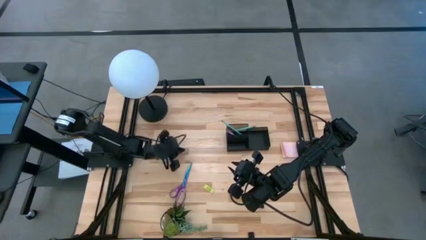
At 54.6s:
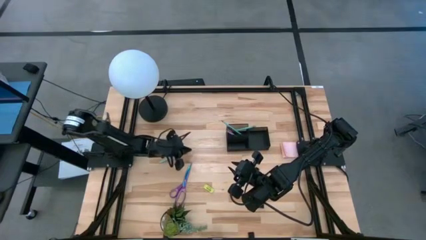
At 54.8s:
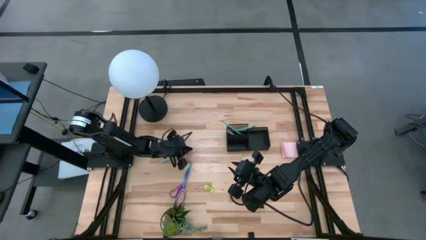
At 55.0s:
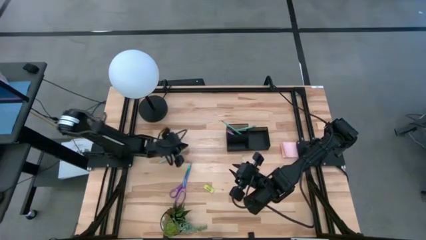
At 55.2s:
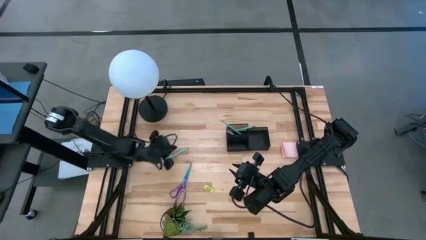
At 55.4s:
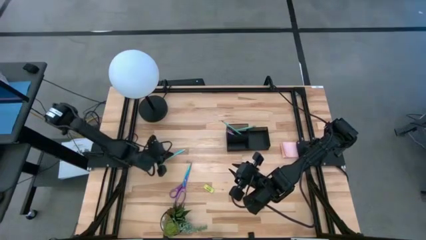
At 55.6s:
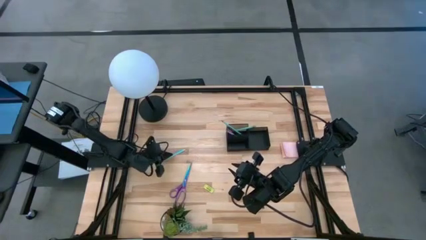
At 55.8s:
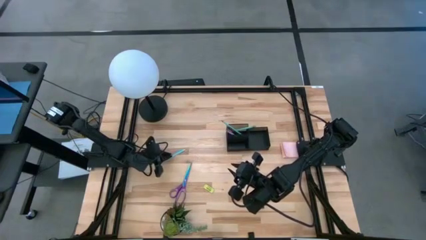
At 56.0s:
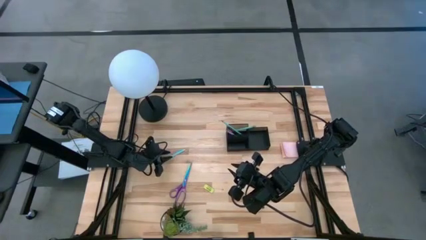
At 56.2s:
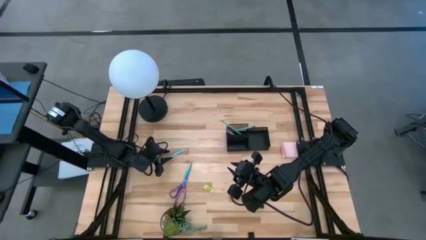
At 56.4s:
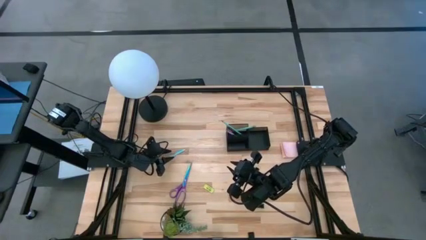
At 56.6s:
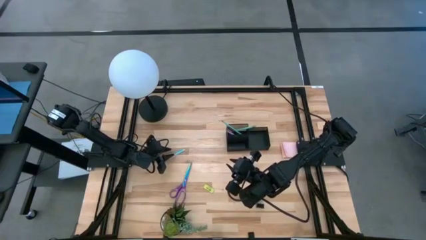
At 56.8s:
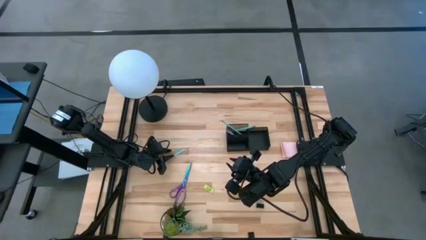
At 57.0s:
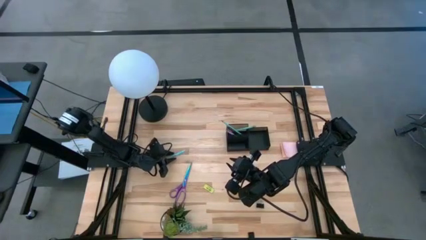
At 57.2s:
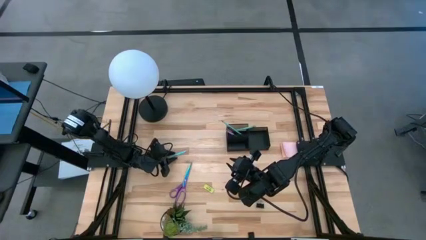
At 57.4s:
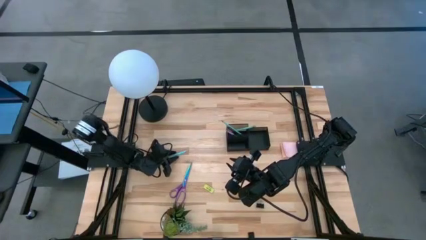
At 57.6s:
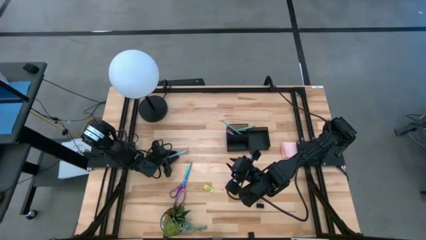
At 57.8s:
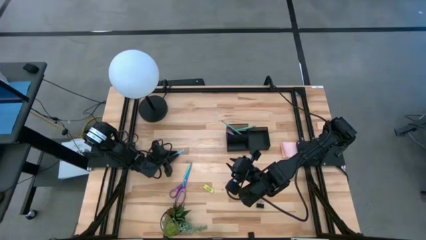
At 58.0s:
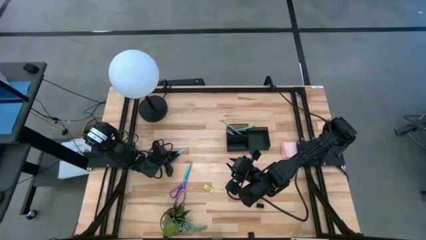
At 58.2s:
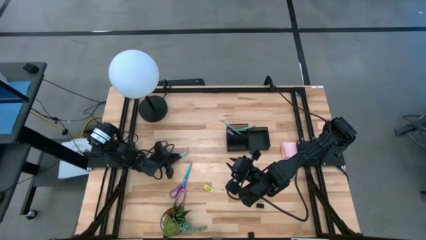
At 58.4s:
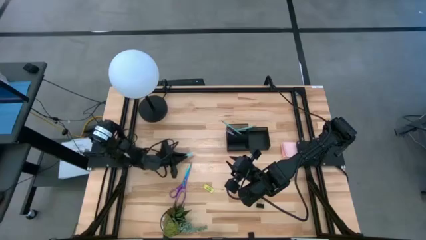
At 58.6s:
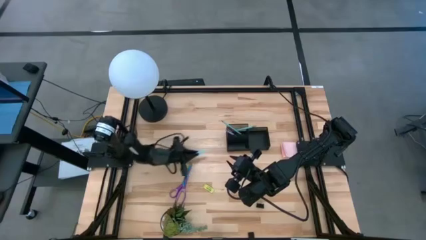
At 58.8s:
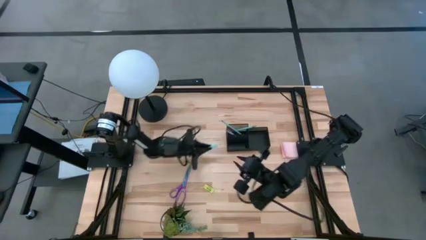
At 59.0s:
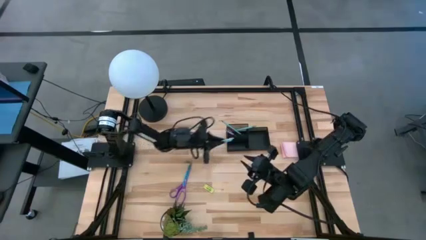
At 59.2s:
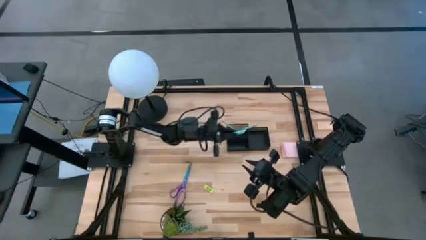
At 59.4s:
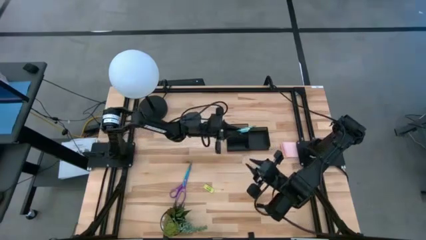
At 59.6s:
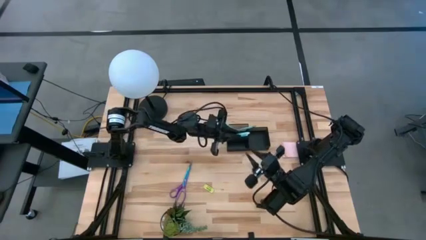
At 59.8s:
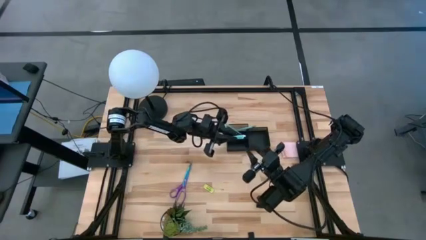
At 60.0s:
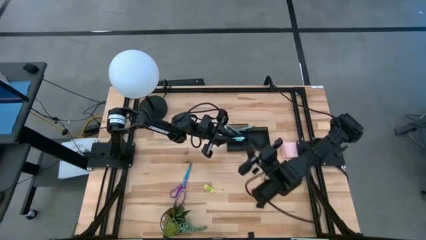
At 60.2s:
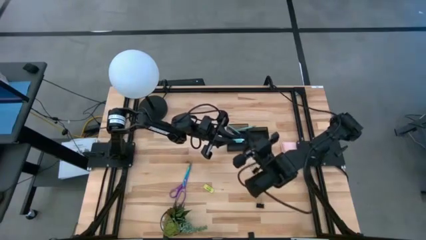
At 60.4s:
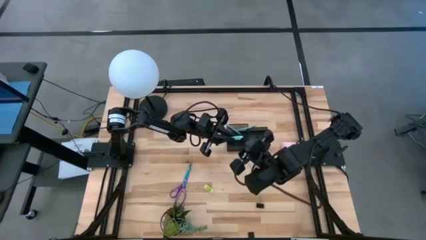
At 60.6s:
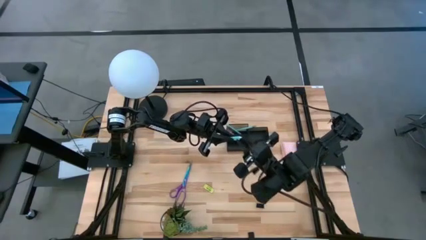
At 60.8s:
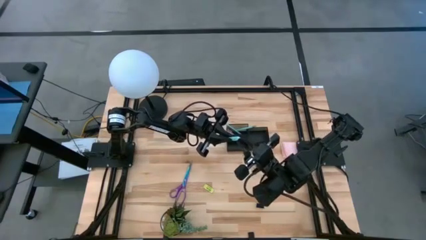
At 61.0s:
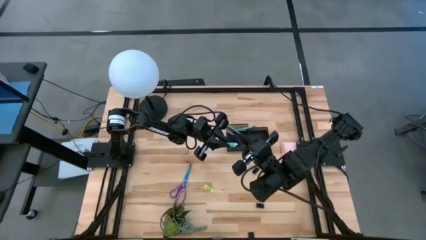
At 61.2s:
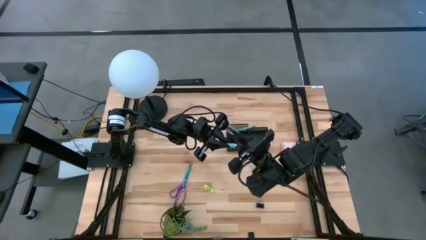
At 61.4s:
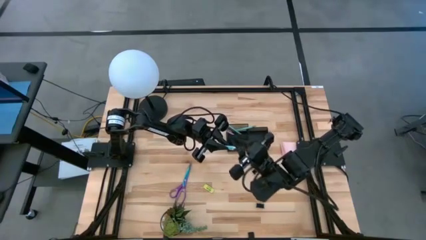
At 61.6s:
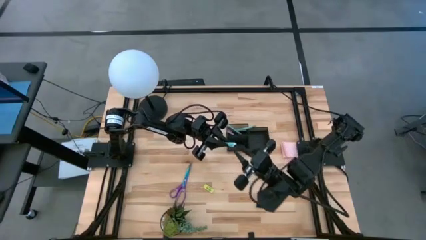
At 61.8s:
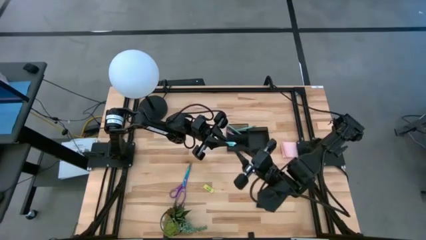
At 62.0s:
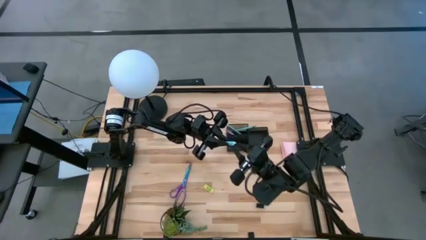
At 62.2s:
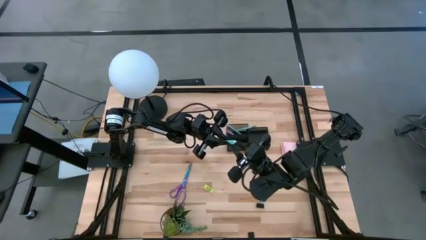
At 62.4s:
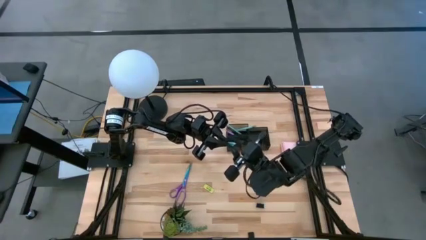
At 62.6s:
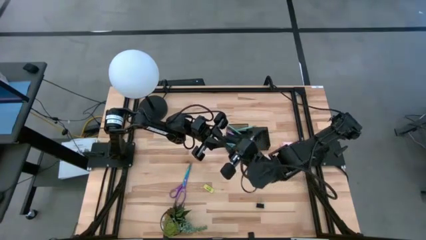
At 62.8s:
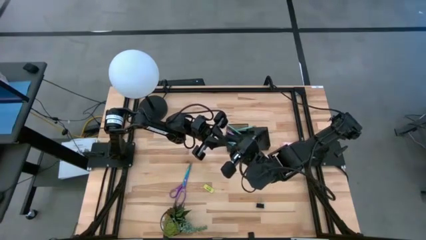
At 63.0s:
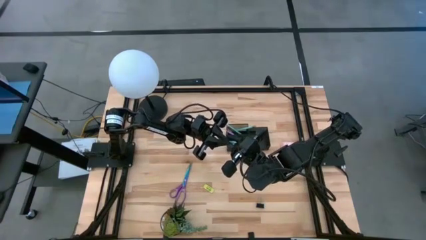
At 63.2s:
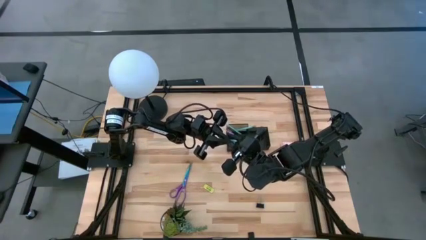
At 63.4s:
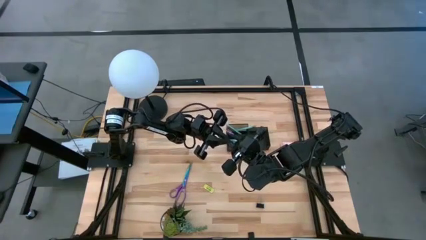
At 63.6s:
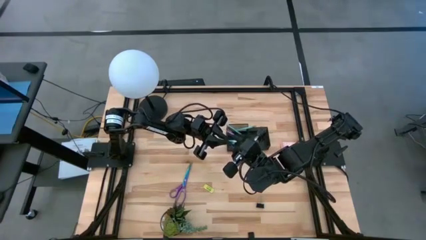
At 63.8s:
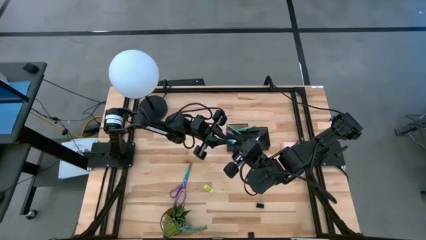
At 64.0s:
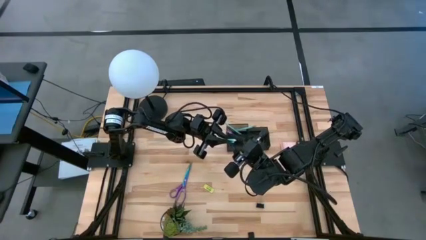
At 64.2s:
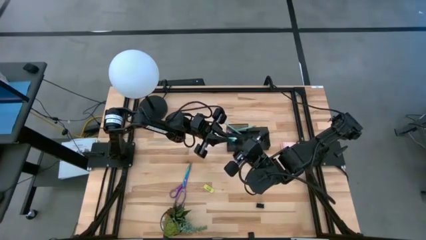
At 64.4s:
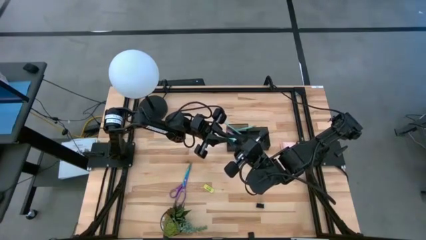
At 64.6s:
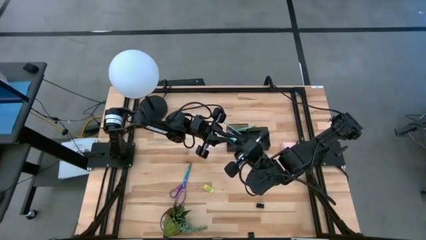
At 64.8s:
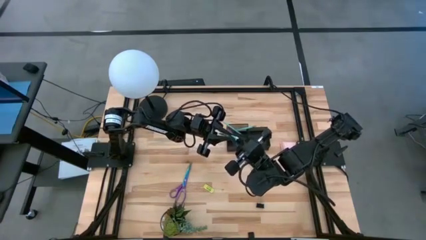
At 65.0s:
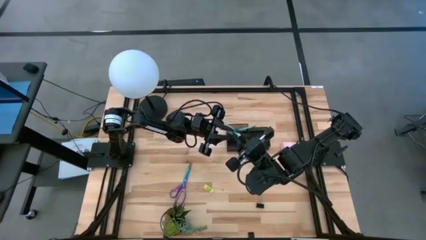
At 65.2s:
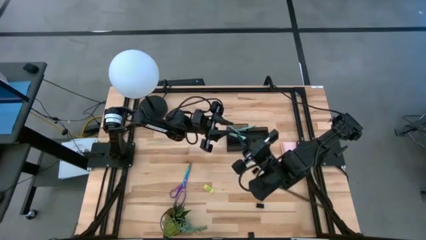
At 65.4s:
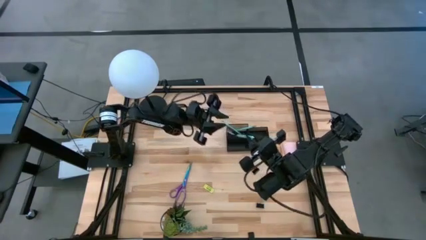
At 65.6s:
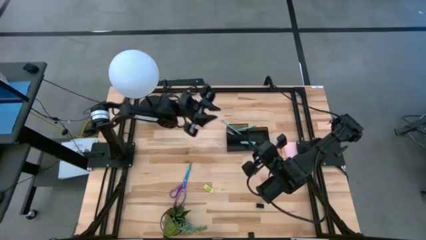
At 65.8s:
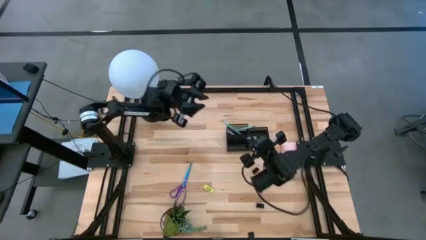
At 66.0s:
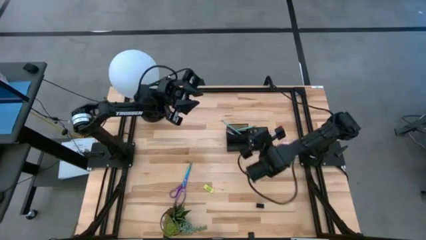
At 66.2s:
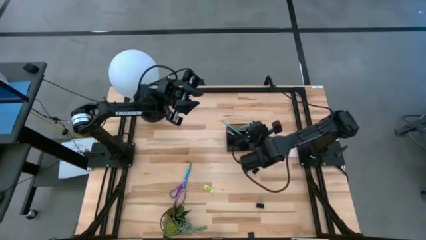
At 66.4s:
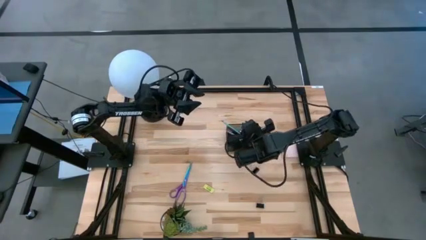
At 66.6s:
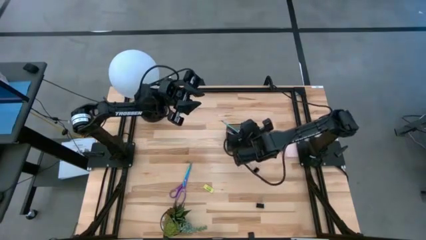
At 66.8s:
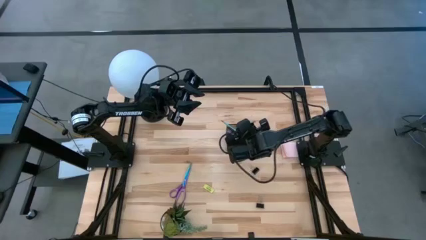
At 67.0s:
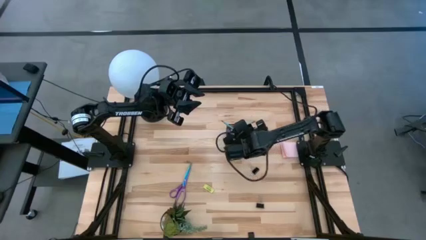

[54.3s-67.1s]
Task: Pick and place office supplies into organizer
Put the blue pen into the black desk organizer
